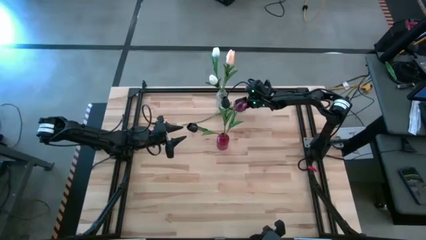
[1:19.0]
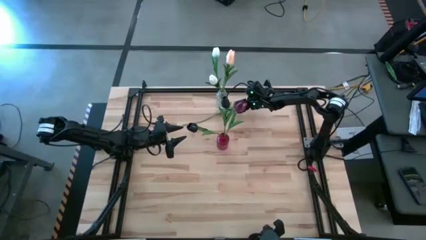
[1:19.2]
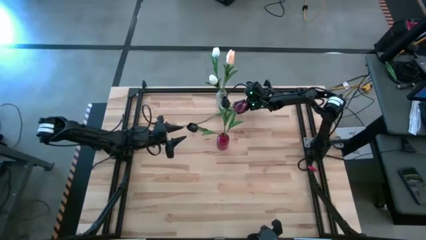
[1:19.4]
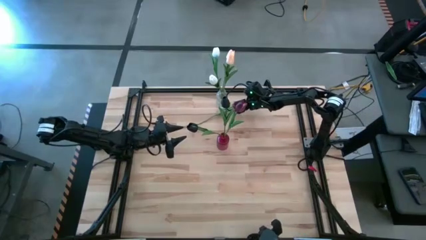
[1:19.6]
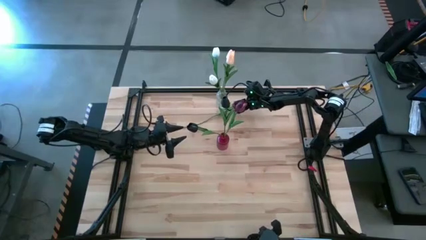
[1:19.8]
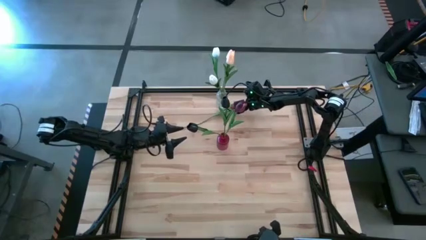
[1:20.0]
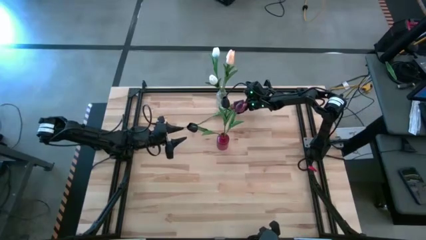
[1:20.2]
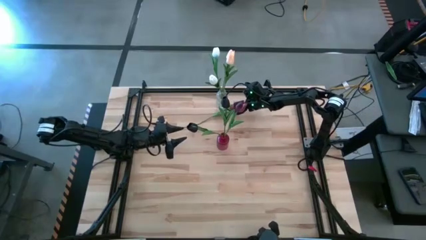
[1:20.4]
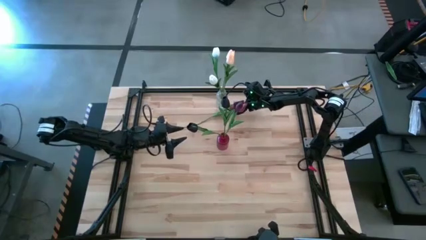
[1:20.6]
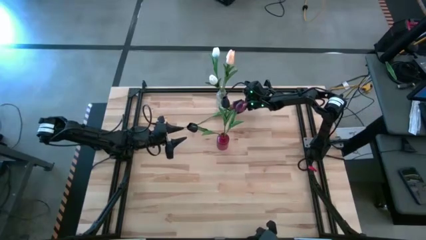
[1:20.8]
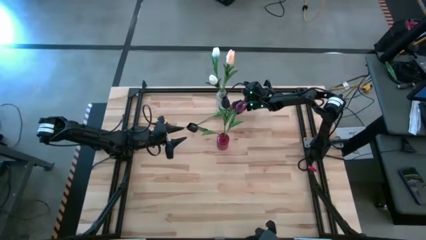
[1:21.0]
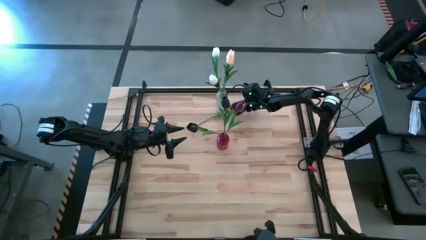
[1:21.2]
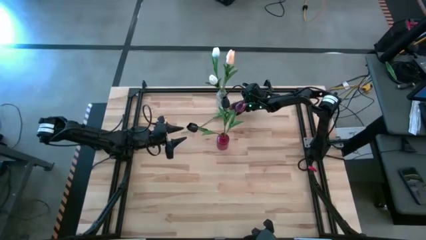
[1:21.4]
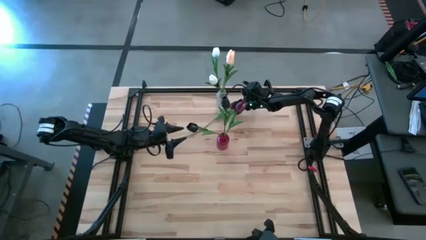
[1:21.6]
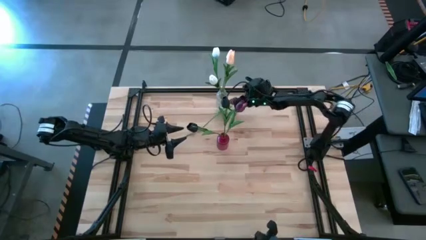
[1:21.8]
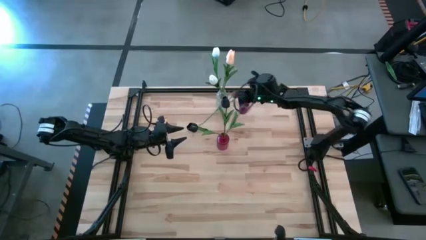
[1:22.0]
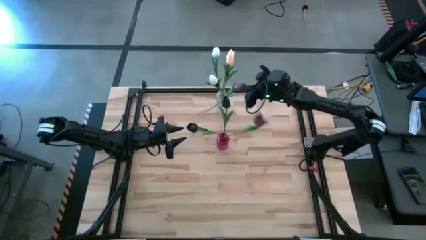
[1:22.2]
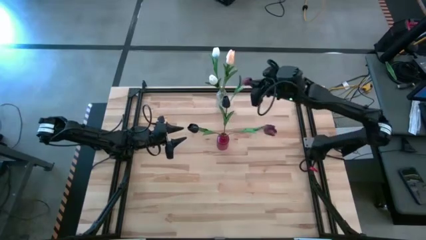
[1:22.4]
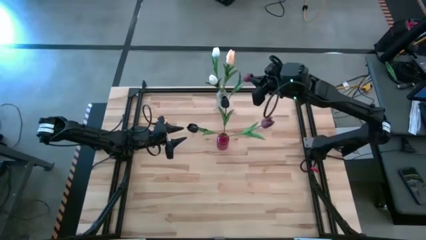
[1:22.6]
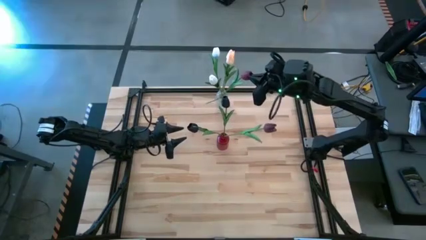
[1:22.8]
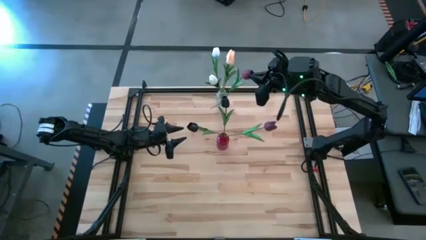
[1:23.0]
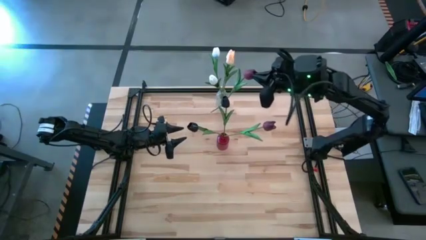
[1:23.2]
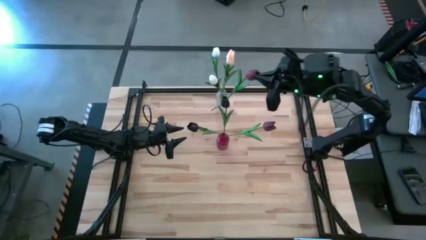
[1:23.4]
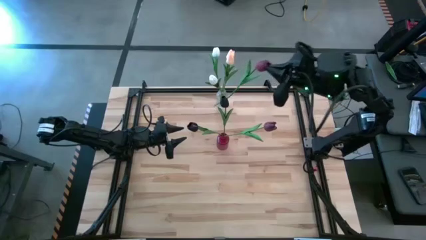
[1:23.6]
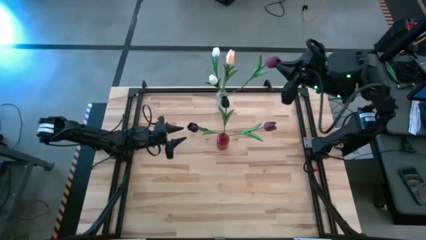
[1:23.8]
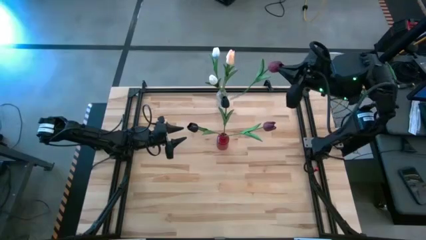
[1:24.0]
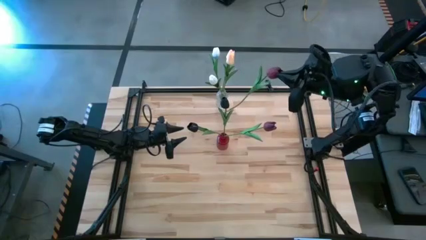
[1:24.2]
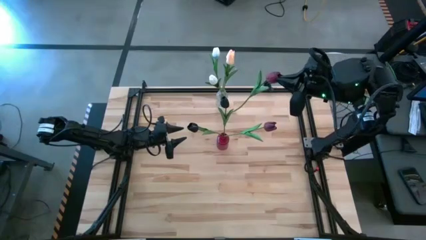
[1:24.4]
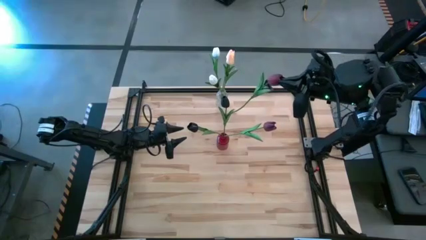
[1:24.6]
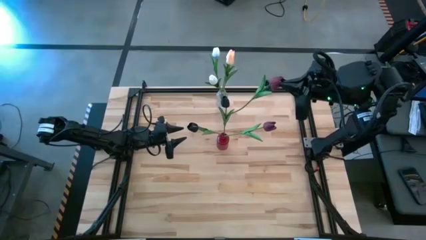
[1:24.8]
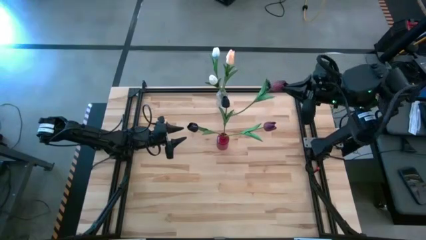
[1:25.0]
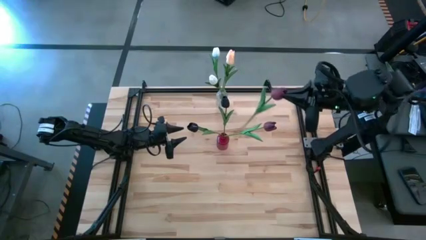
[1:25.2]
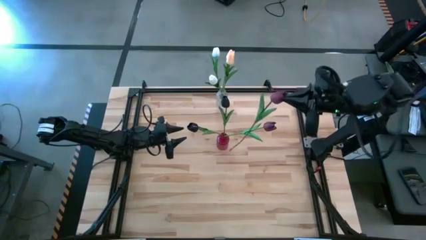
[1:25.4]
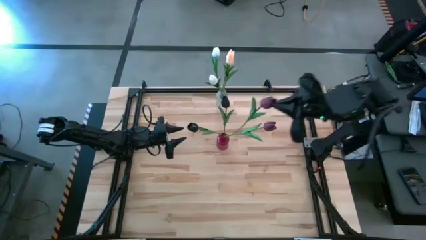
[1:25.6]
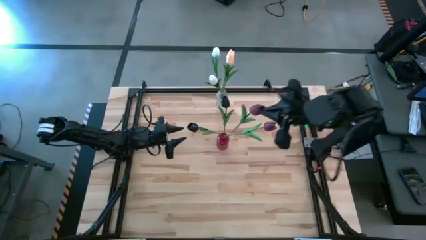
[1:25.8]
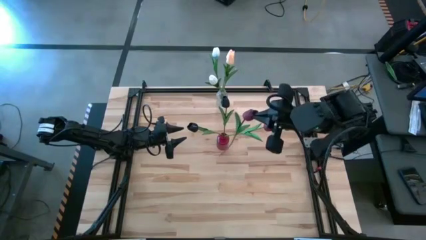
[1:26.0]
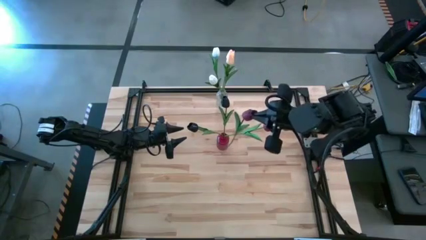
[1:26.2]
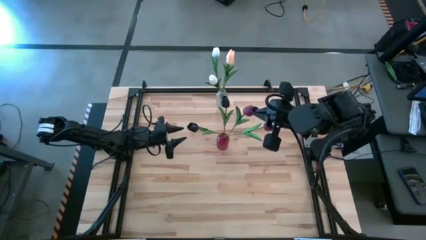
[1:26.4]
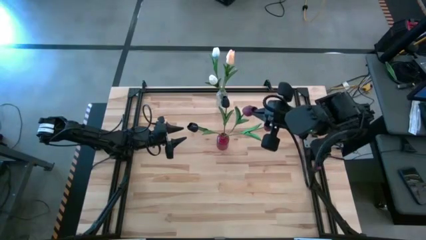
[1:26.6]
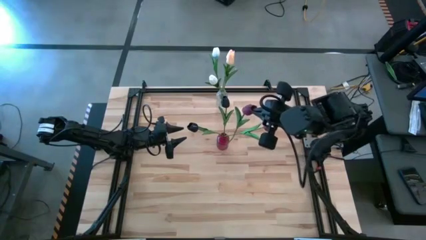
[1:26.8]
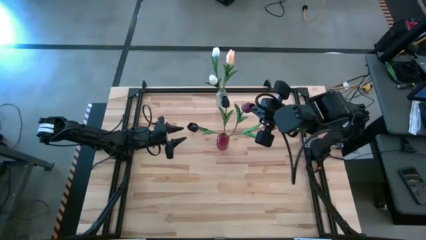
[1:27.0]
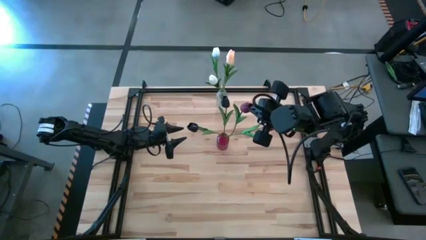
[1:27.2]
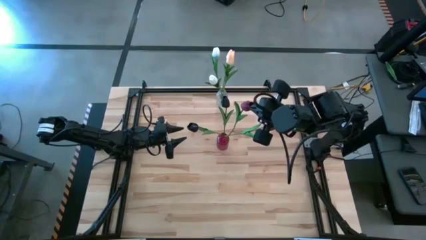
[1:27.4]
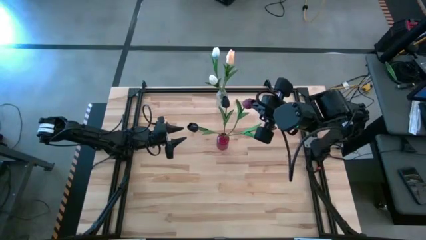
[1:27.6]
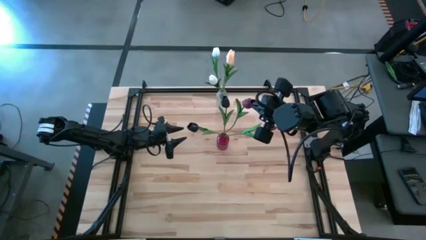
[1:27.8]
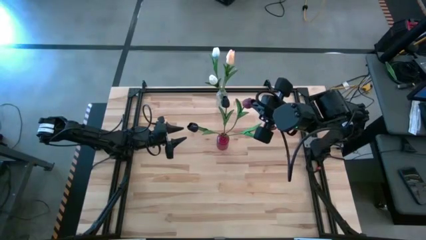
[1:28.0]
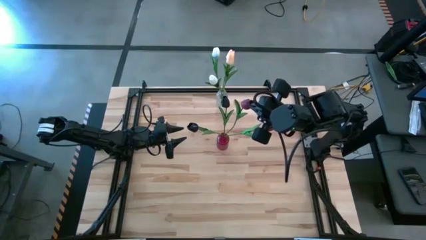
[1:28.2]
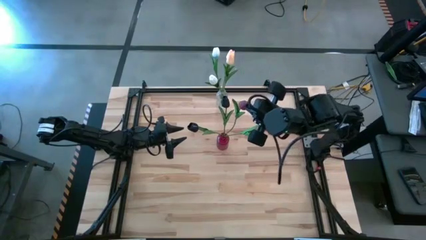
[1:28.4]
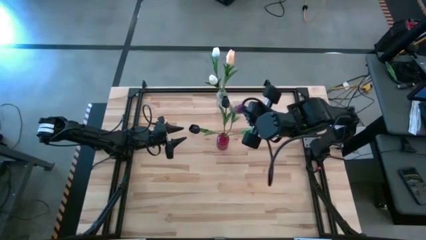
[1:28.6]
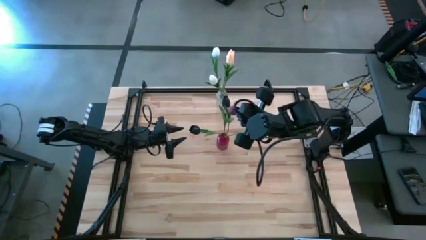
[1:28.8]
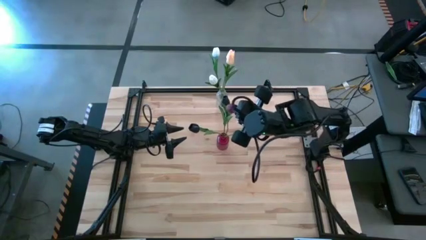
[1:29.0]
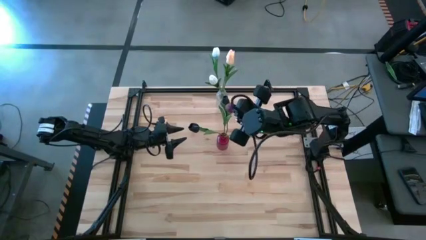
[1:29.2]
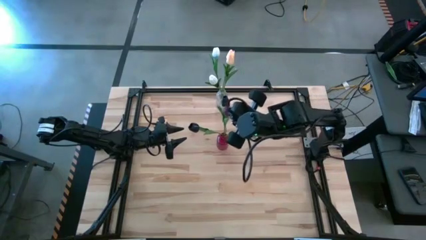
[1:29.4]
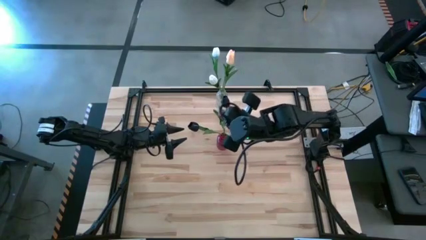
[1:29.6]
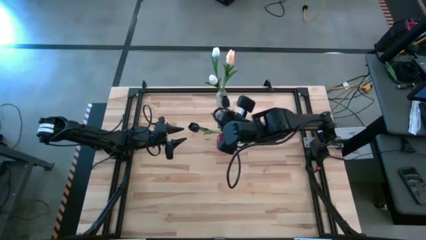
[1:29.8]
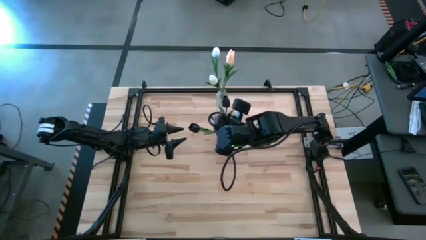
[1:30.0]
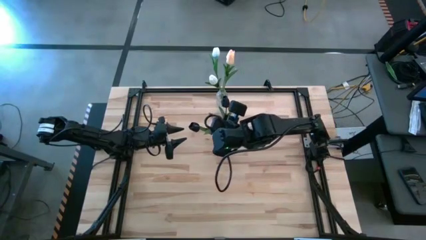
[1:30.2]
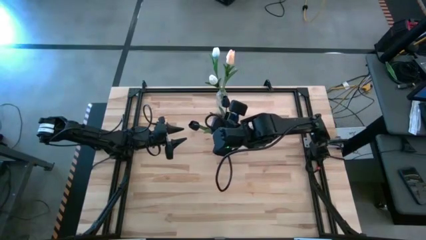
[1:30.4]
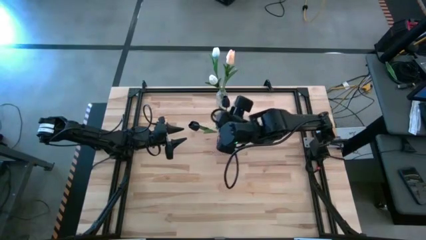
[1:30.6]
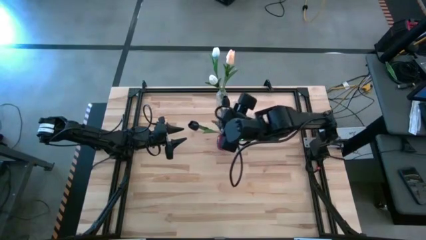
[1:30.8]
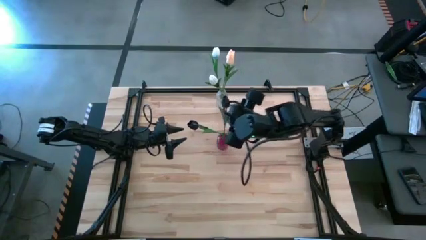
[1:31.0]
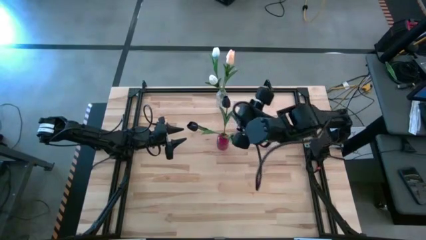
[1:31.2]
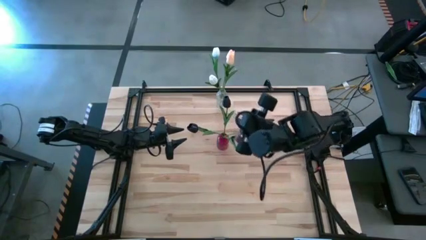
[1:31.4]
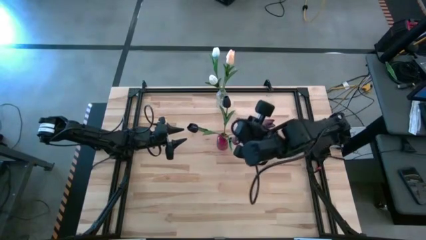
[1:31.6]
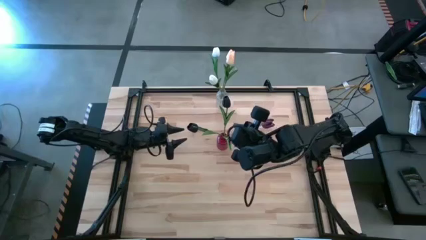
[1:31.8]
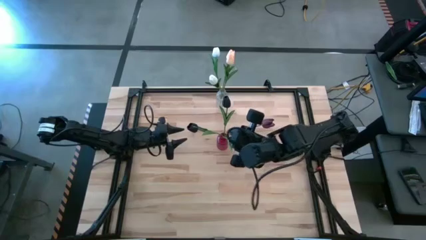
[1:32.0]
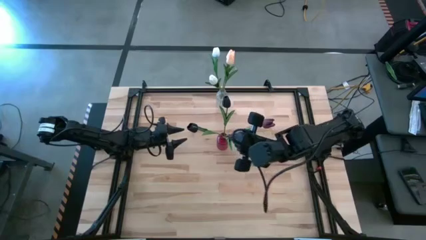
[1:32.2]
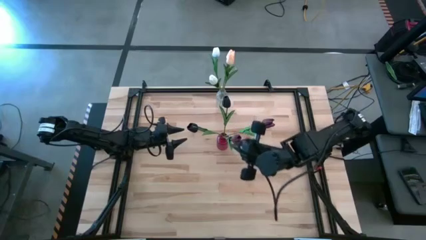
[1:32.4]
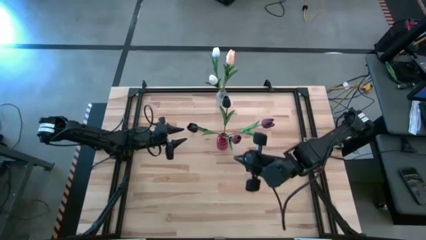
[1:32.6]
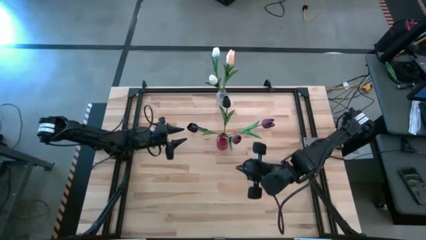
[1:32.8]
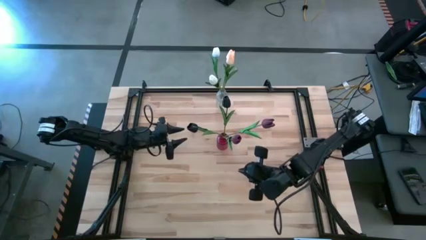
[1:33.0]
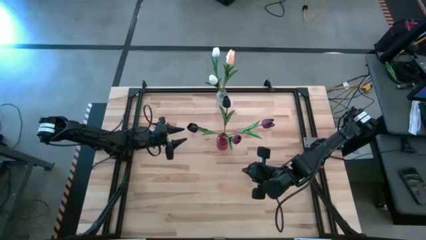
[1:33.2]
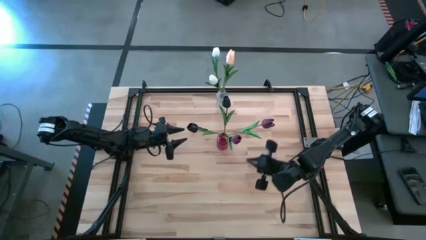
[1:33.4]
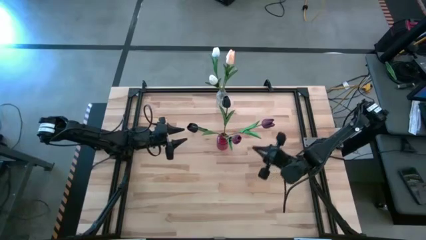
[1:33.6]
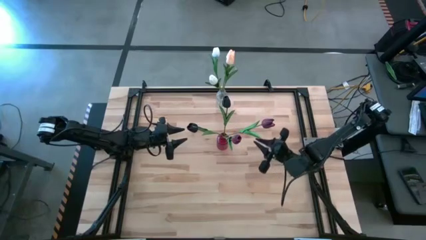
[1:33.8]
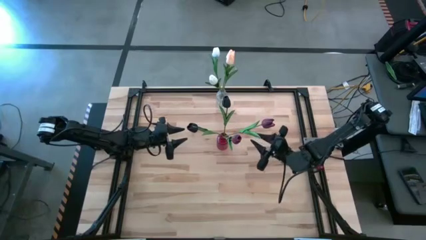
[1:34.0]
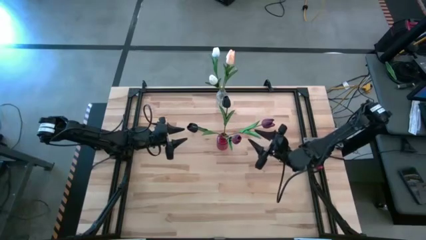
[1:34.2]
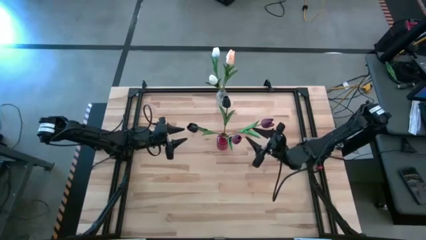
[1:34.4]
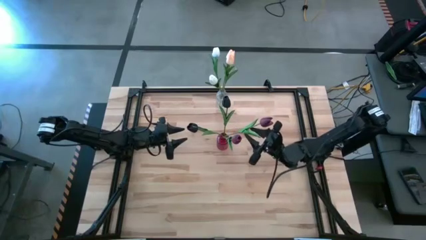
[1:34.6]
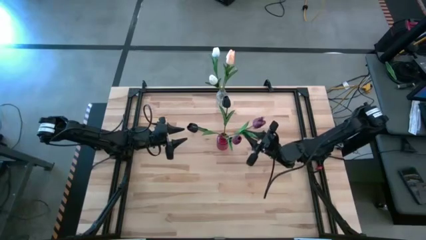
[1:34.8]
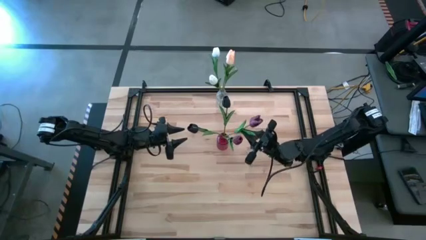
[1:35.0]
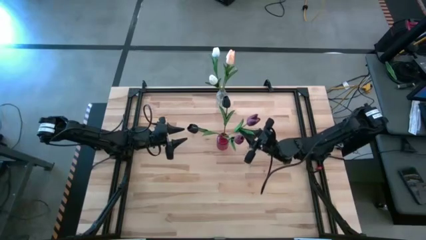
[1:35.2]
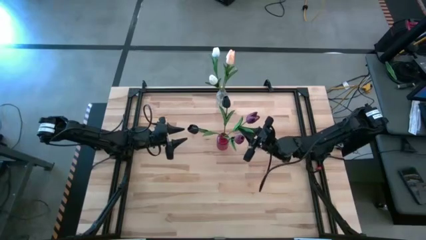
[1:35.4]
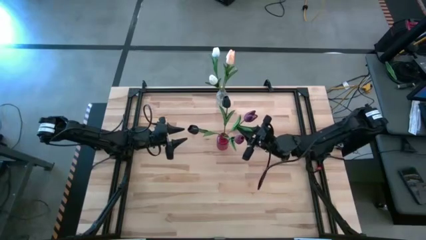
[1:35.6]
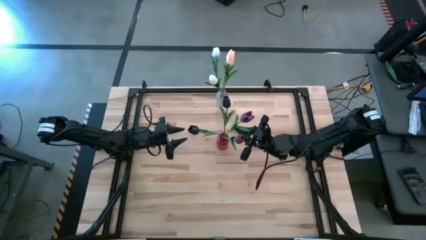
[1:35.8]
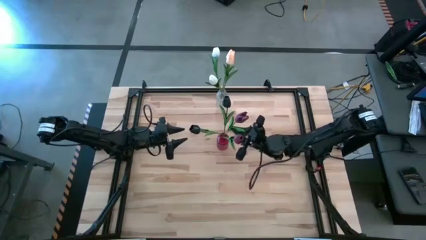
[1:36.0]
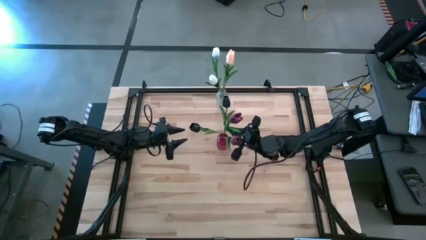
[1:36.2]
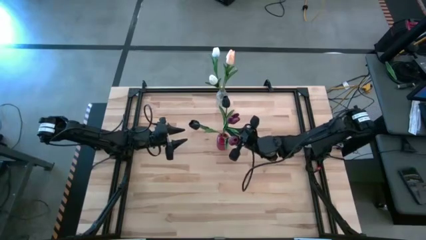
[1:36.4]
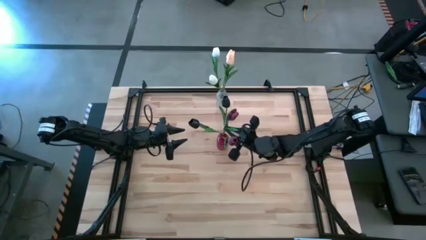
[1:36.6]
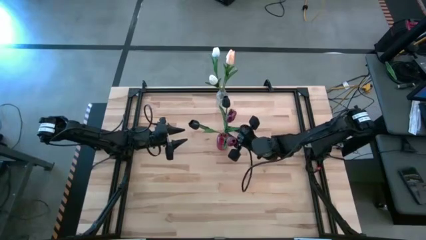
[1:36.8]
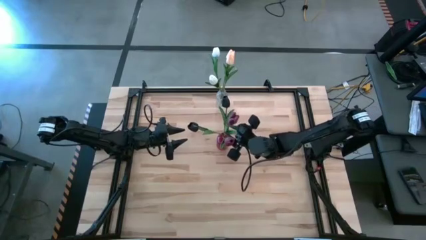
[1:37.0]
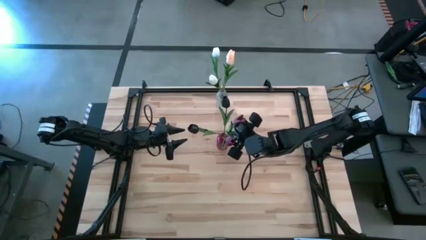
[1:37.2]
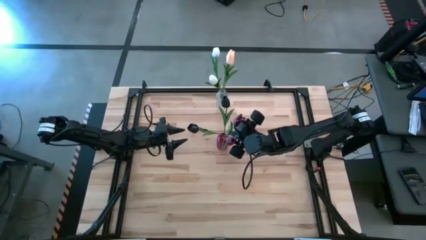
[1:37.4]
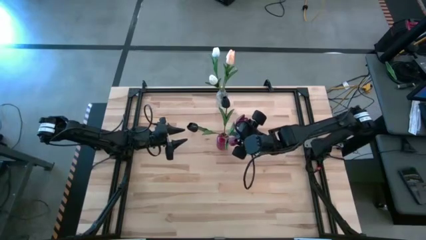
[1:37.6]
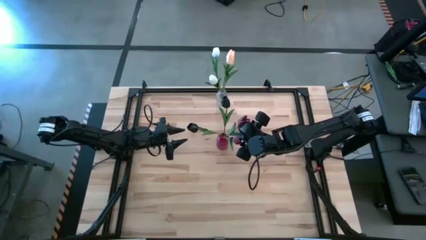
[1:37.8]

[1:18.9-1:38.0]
Task: Sort flowers into vase by color
Put the red flower into the red vase
